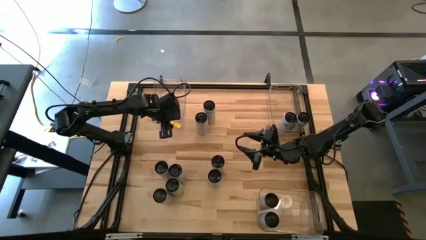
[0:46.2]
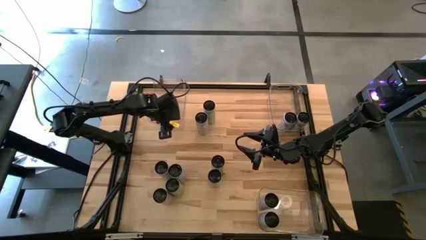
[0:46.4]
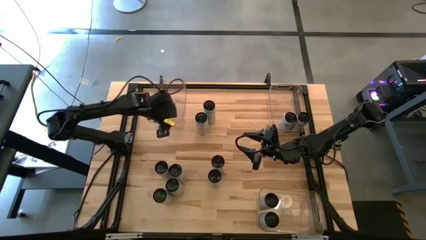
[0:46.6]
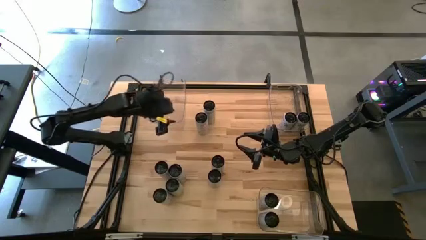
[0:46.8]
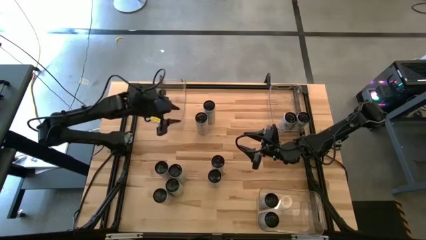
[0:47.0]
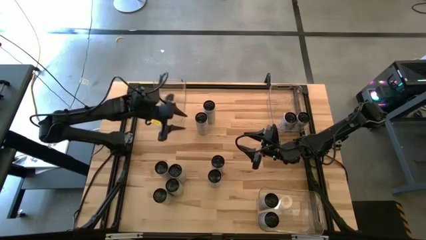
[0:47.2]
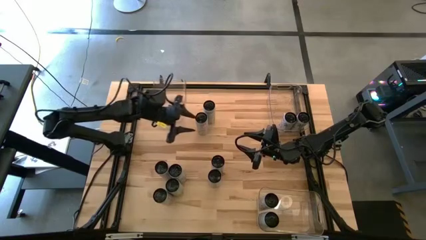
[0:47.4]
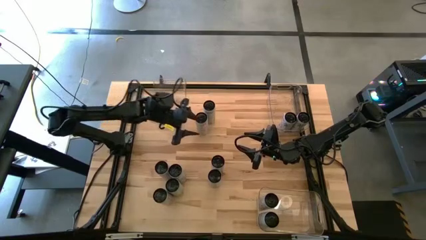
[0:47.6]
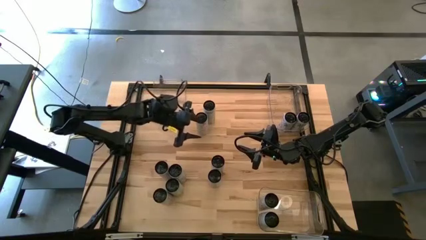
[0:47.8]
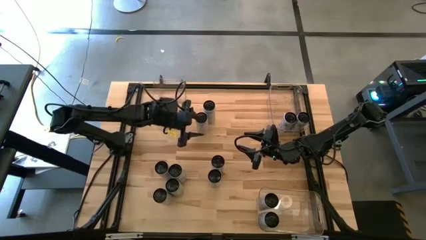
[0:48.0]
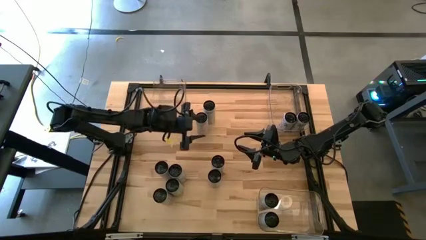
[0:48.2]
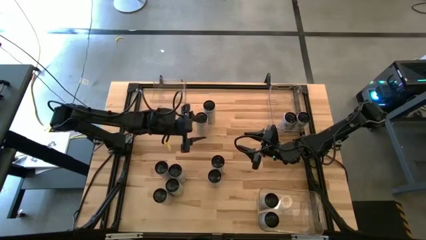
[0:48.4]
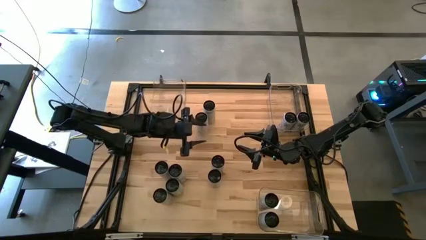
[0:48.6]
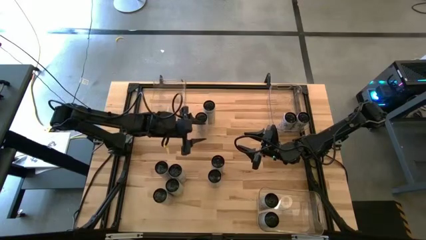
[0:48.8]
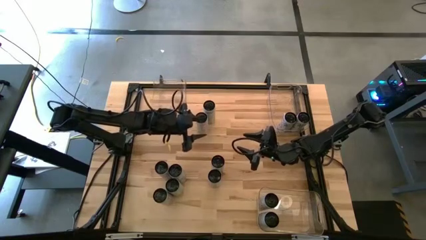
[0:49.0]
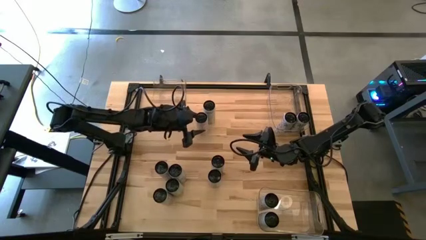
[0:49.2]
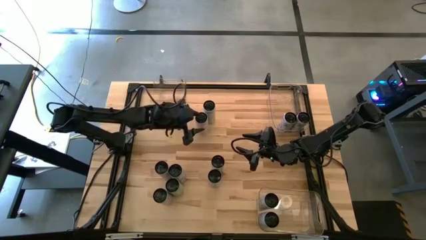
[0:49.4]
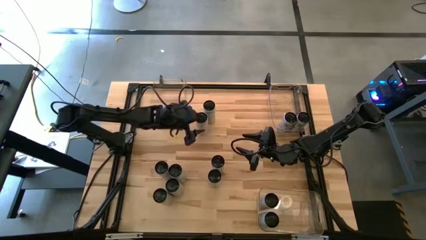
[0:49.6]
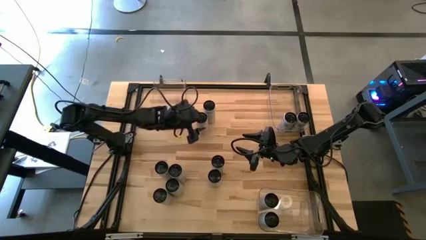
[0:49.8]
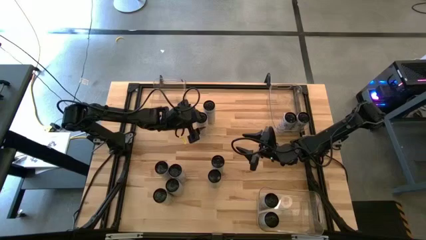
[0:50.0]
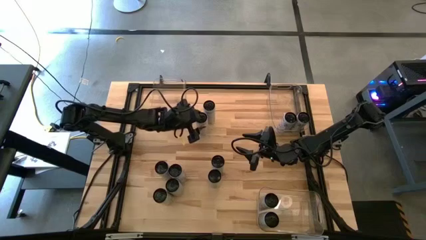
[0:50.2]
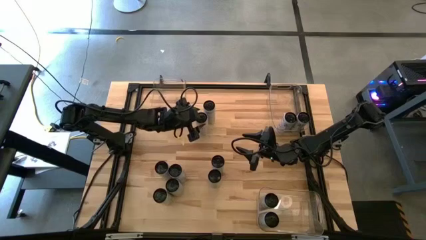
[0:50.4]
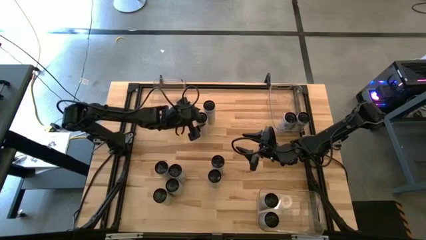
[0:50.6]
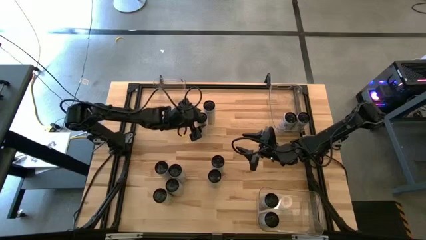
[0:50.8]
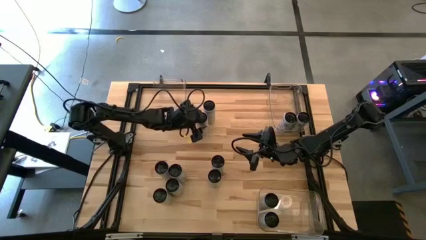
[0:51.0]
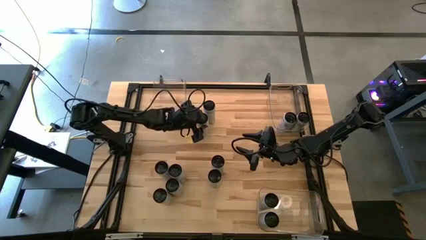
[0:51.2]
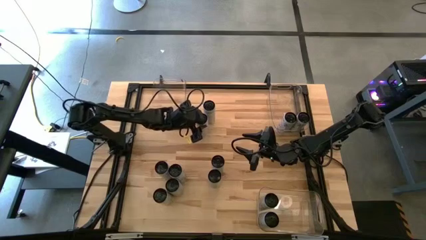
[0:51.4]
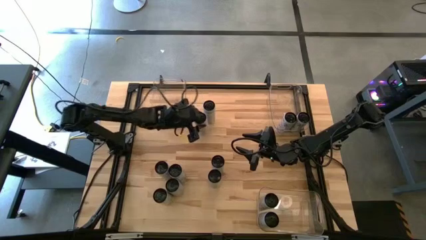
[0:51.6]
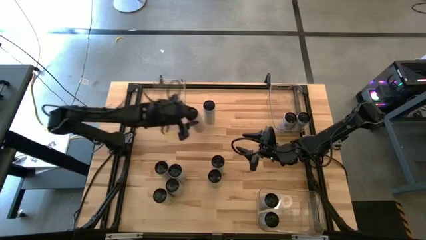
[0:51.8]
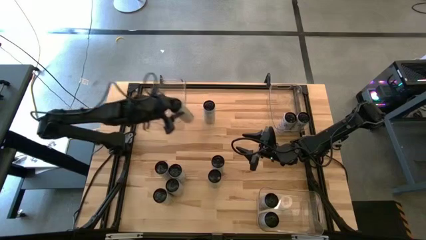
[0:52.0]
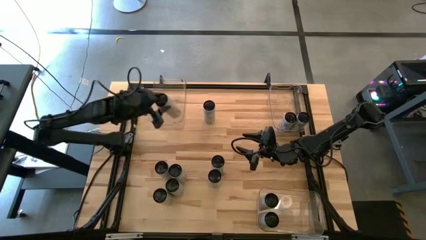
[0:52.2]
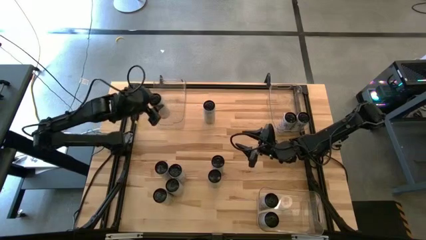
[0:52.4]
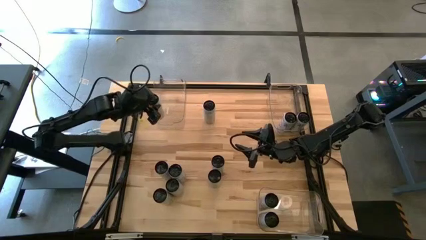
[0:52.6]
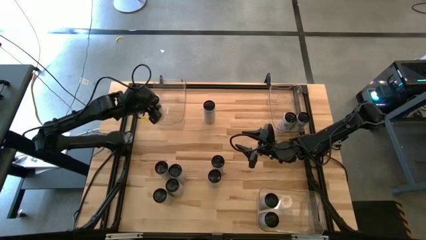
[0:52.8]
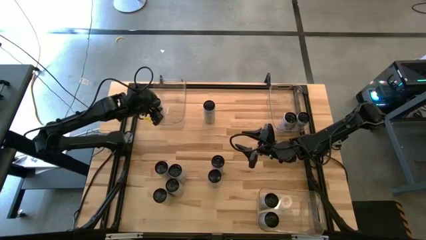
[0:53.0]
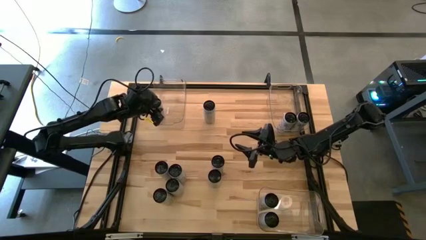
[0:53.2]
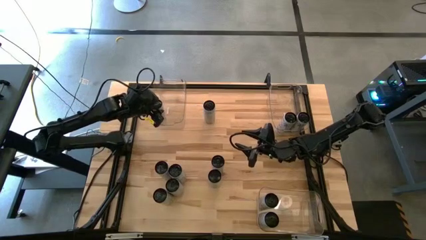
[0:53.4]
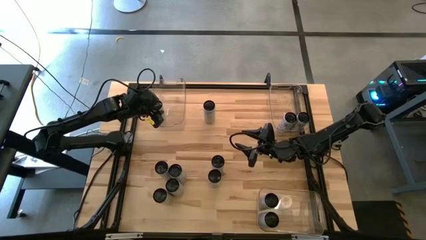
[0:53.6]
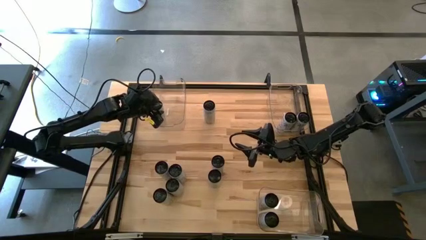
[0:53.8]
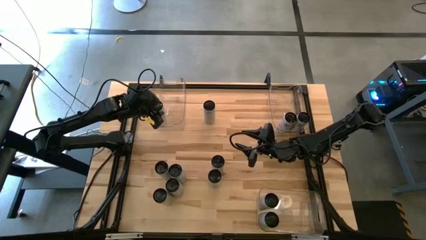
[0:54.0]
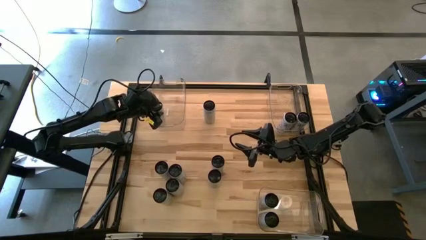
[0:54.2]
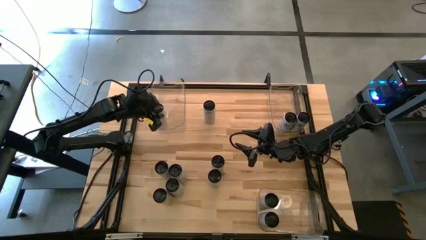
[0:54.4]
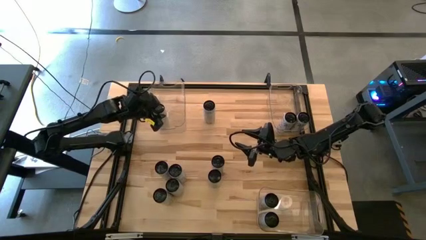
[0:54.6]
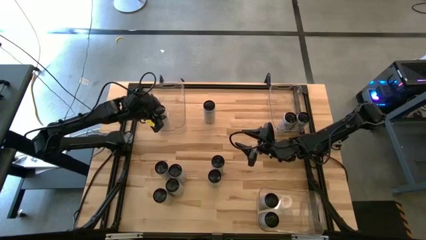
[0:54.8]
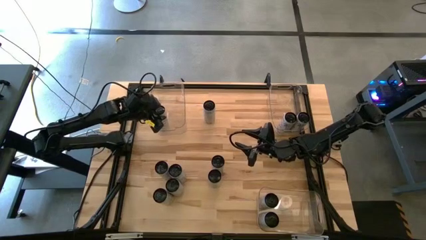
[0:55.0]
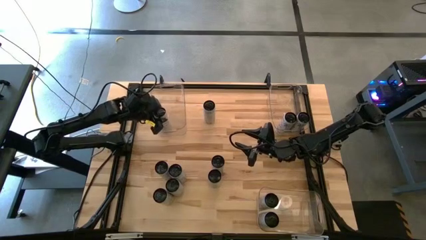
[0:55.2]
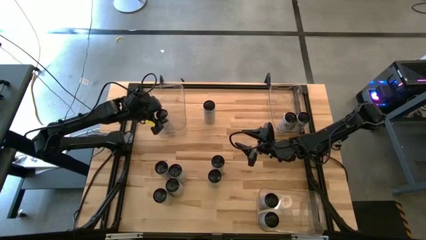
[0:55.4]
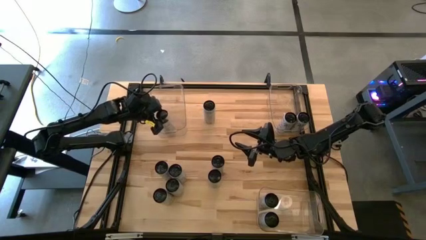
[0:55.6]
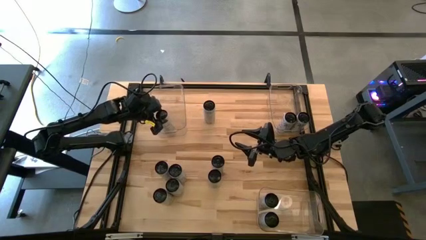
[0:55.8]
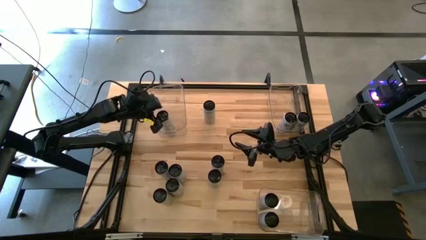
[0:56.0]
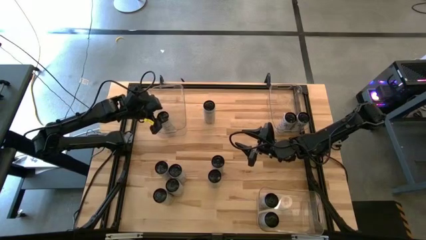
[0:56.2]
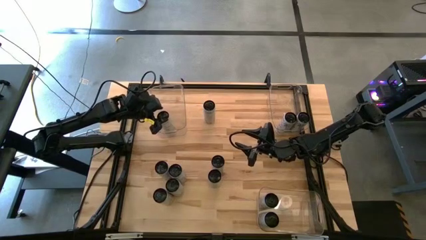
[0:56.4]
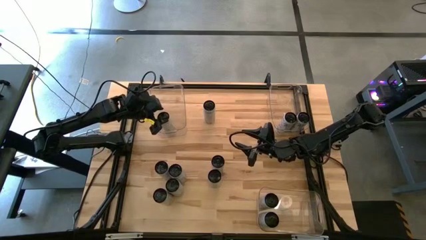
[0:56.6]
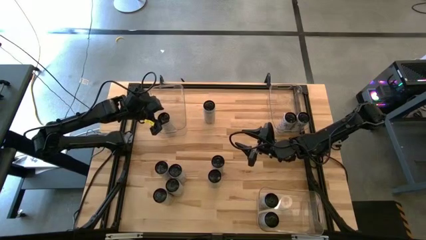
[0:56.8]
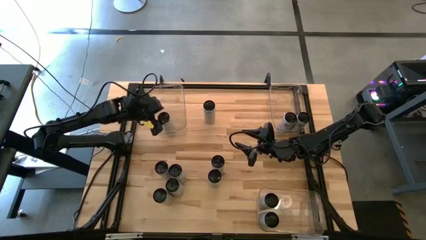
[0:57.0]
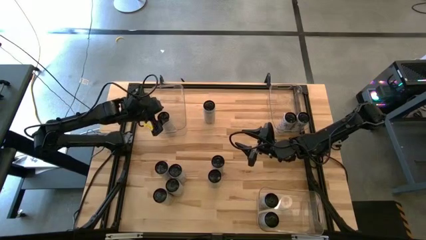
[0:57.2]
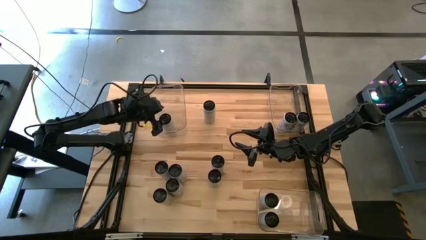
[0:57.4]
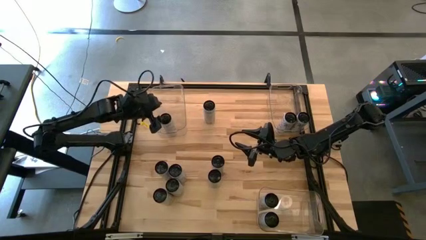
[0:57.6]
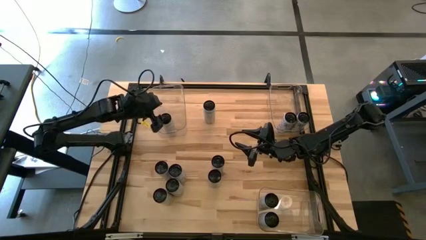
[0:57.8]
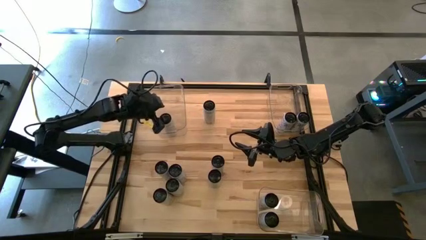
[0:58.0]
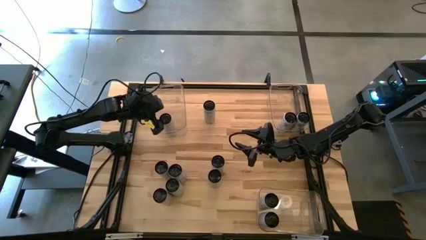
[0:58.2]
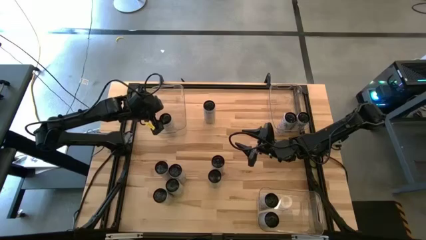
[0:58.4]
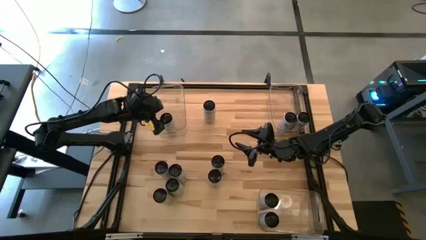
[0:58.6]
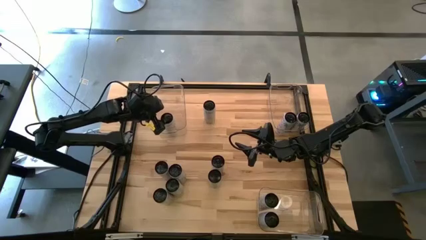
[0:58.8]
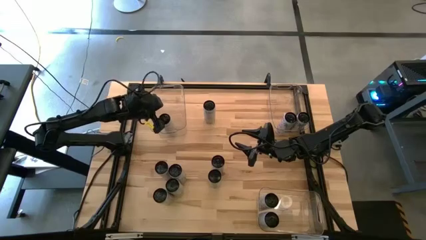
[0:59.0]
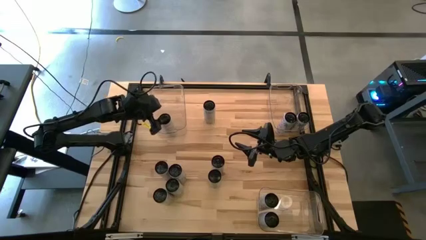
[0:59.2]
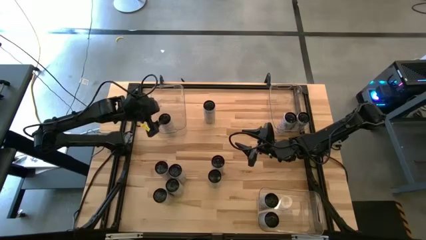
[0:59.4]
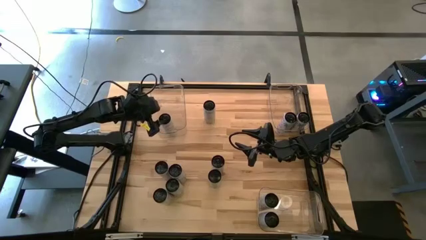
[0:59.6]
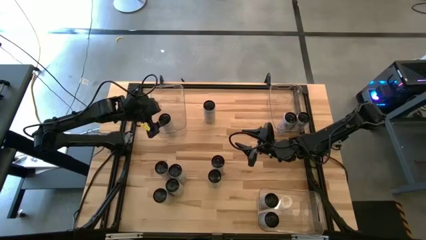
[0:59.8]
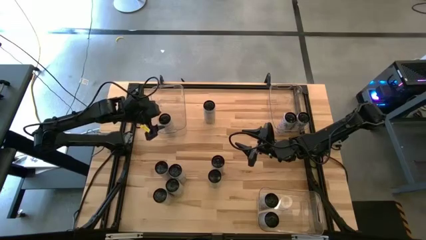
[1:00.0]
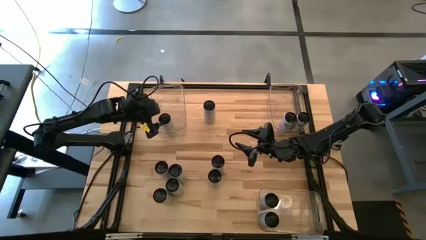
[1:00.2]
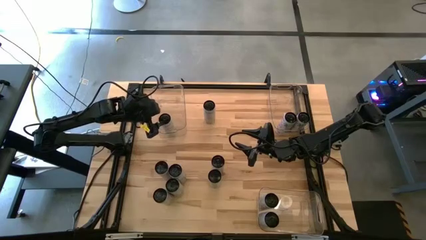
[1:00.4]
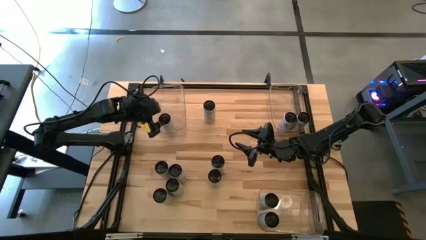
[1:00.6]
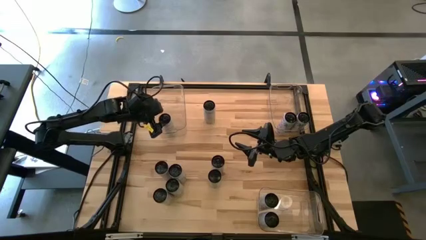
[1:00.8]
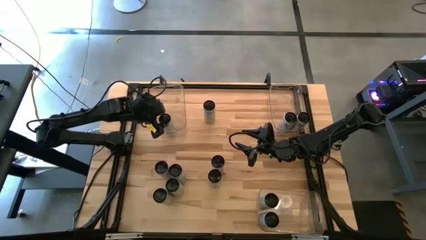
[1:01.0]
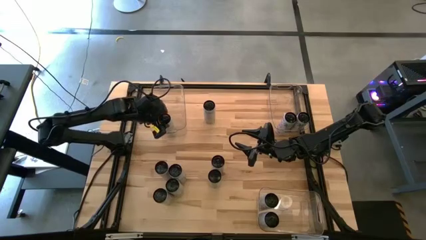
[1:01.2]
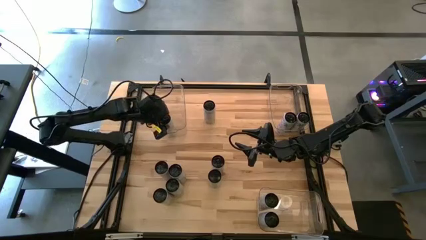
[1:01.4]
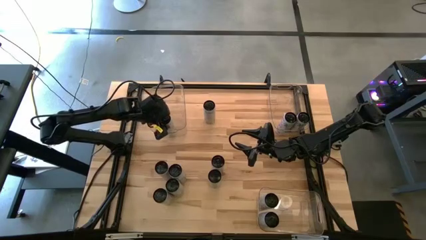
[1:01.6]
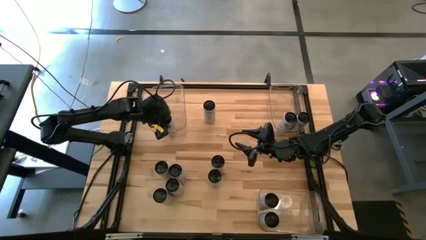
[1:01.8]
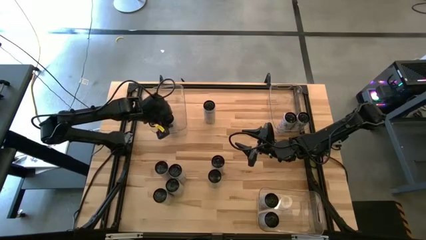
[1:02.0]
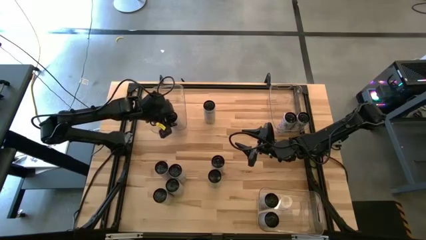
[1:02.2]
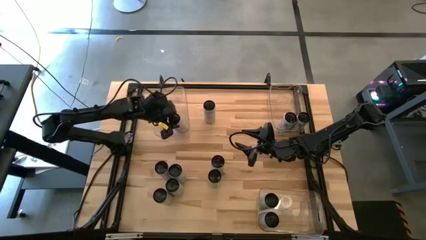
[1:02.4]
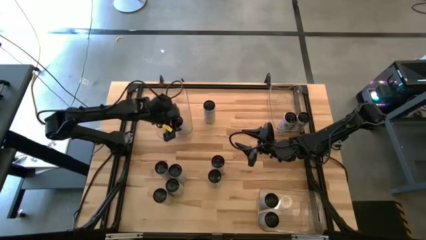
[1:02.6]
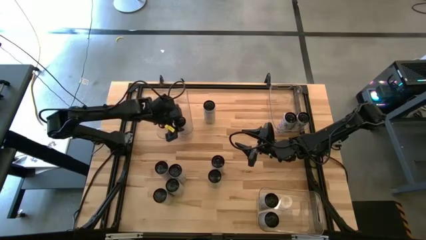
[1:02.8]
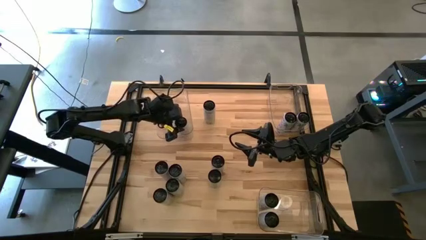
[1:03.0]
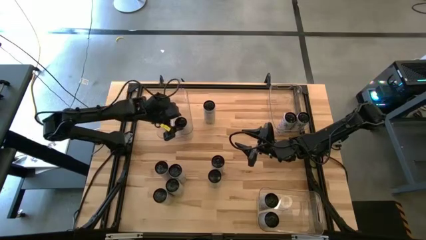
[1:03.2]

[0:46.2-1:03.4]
Task: Sort soda cans
Put the white/yellow soda can into the top left transparent bin
